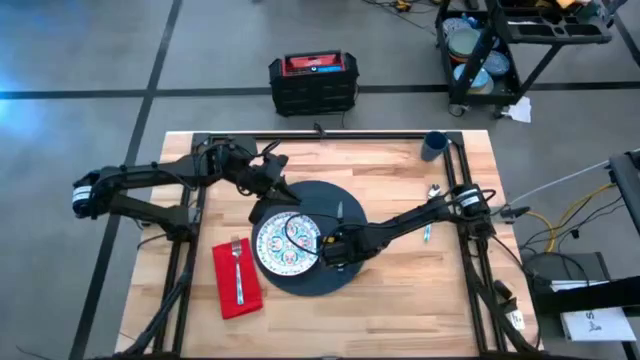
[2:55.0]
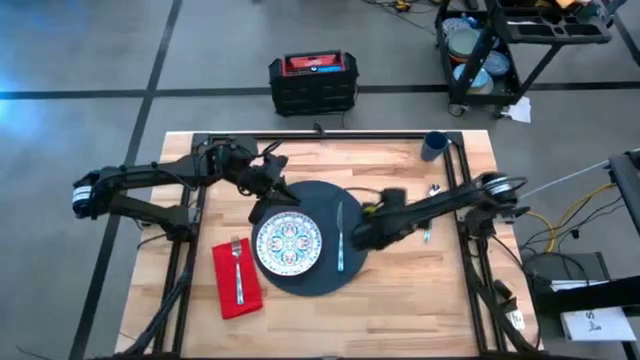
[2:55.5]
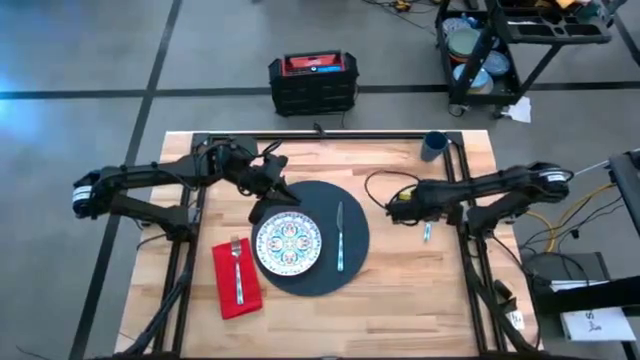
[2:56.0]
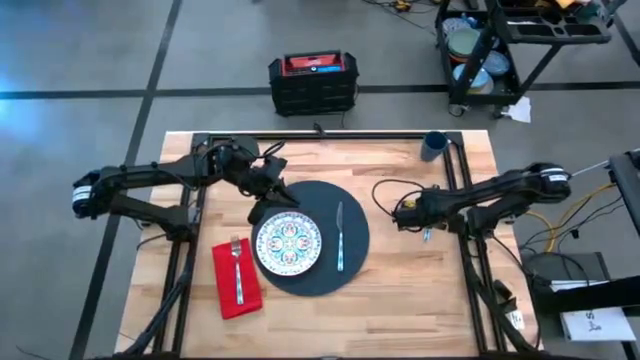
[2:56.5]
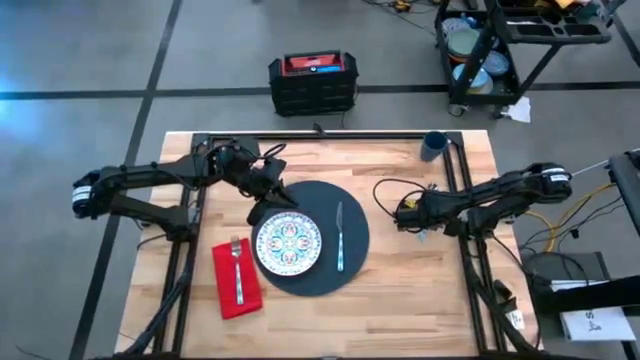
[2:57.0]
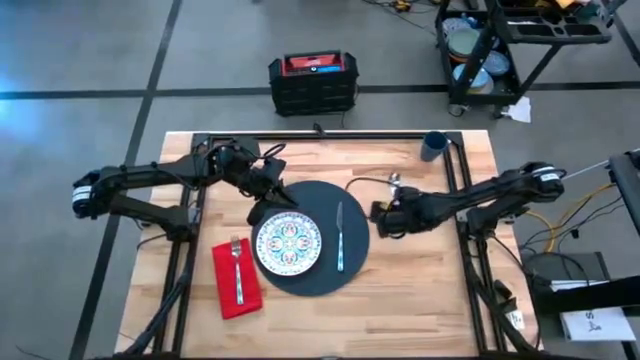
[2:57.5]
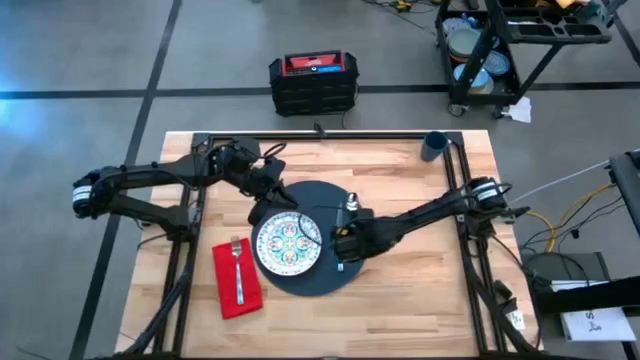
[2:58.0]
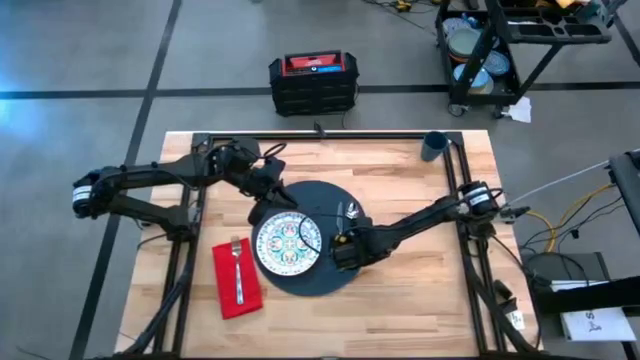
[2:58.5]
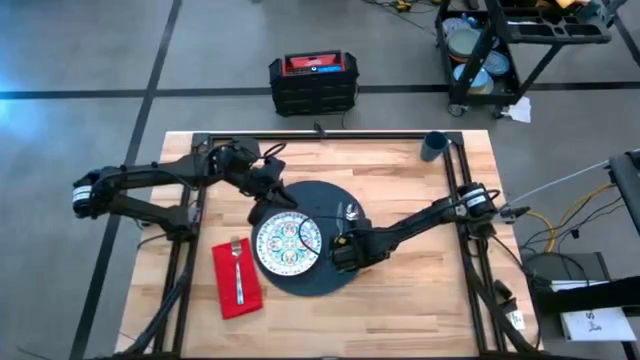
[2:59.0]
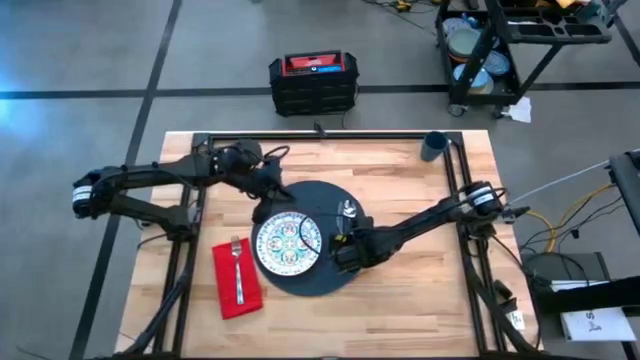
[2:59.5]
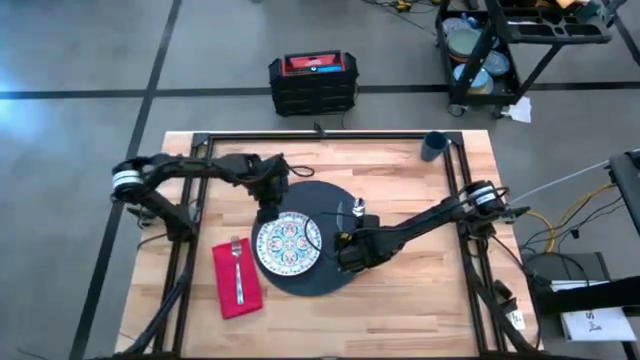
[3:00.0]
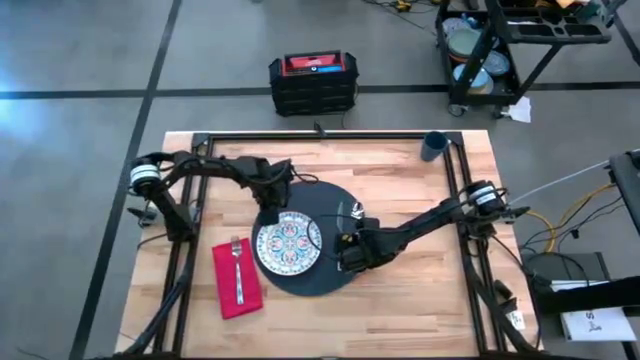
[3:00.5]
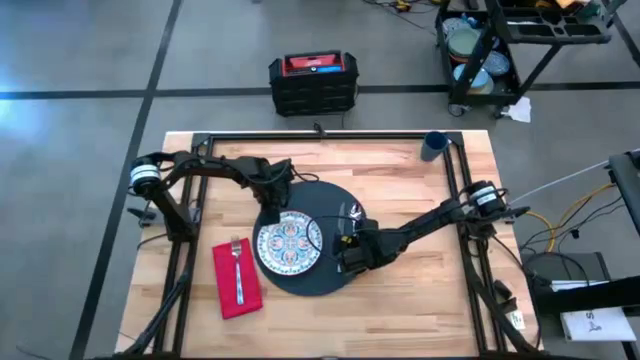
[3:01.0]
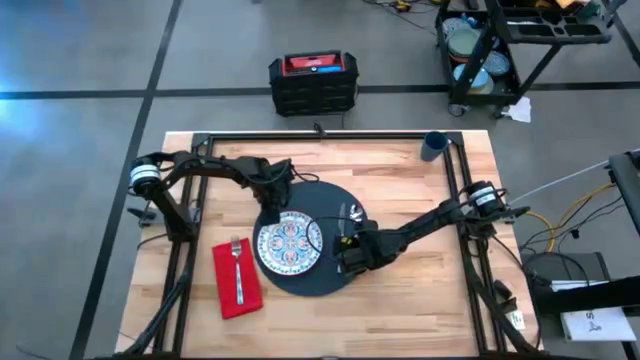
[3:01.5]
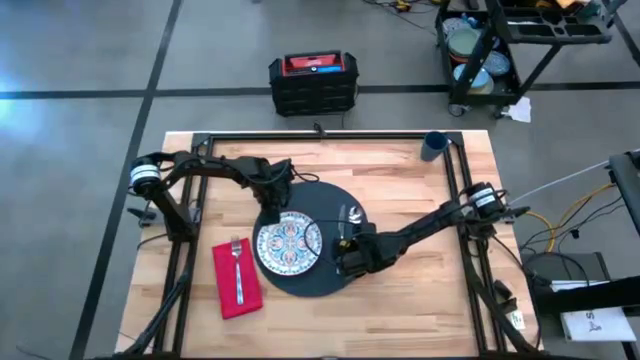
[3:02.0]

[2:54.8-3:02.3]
Task: Set table place
Put the blue spoon on the black placemat

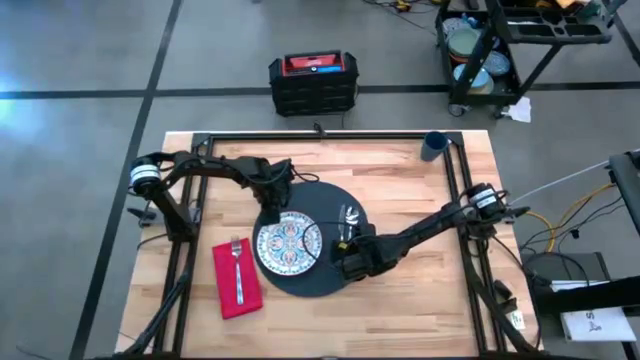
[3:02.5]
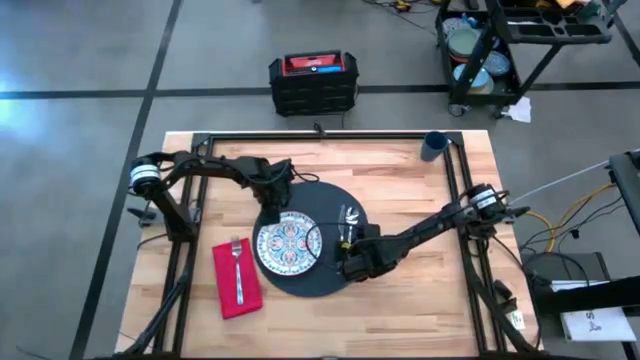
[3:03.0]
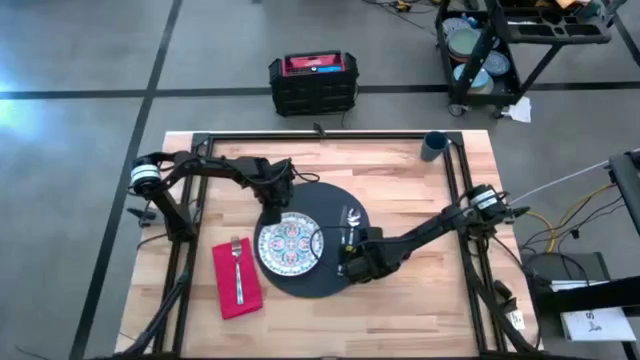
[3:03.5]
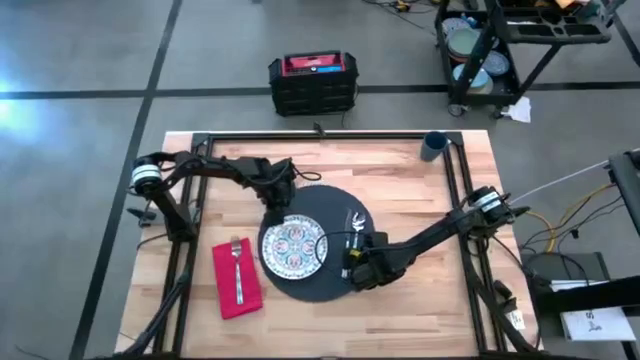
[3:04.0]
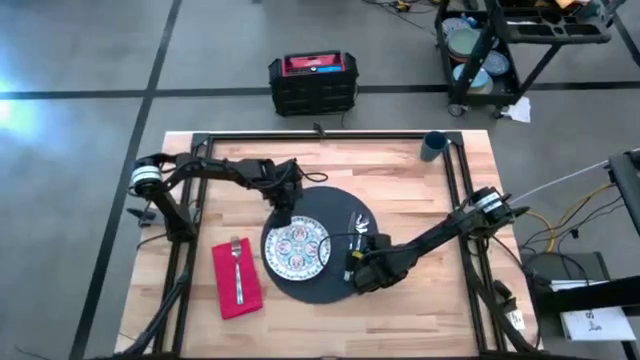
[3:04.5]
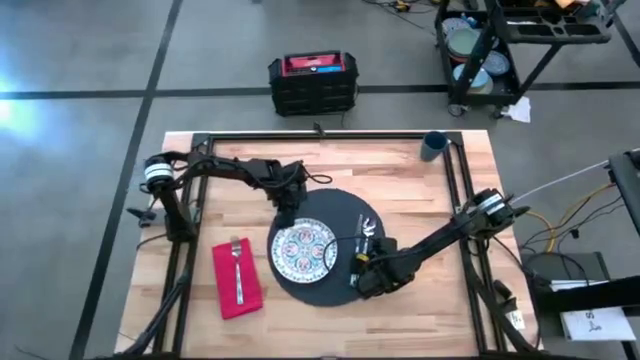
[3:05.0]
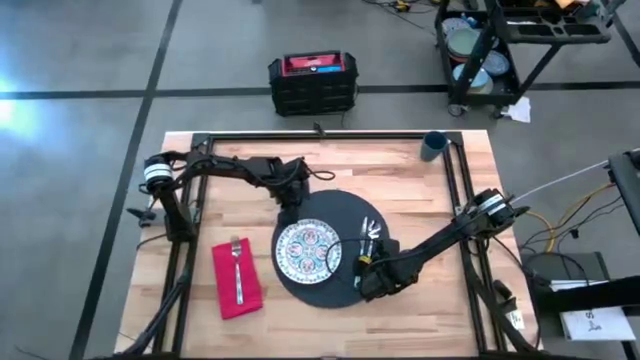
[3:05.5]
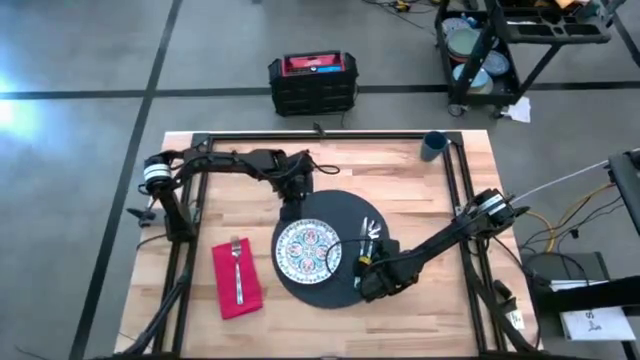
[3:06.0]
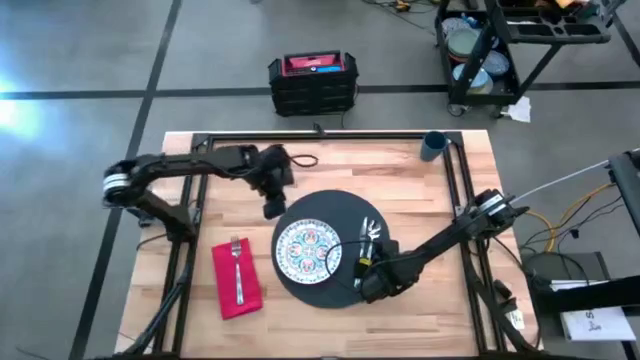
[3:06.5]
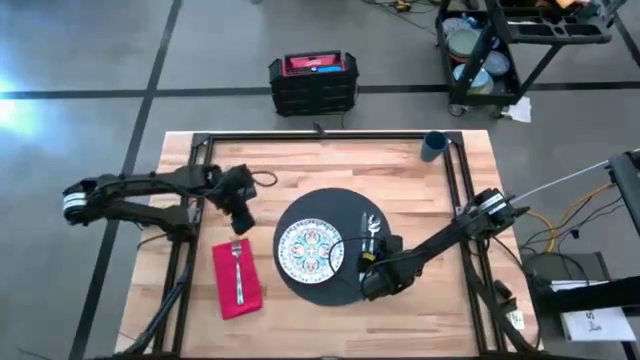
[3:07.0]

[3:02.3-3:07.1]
Adjust the black placemat at the center of the table

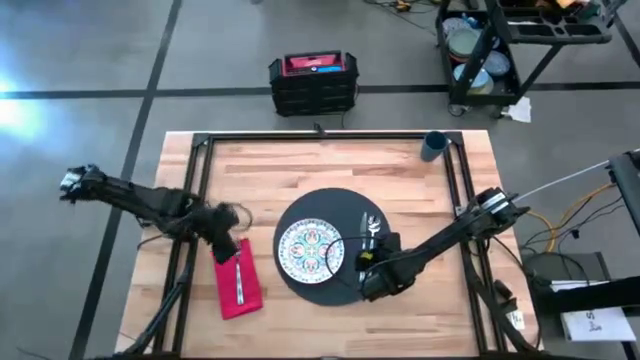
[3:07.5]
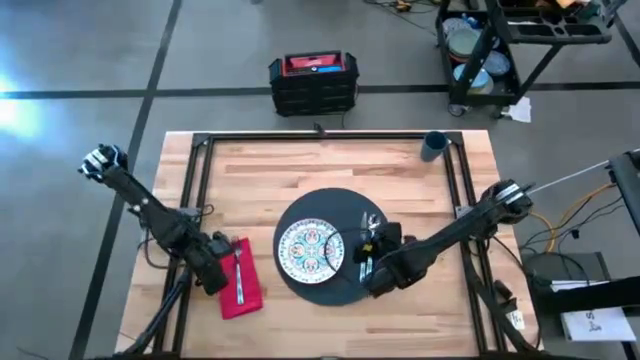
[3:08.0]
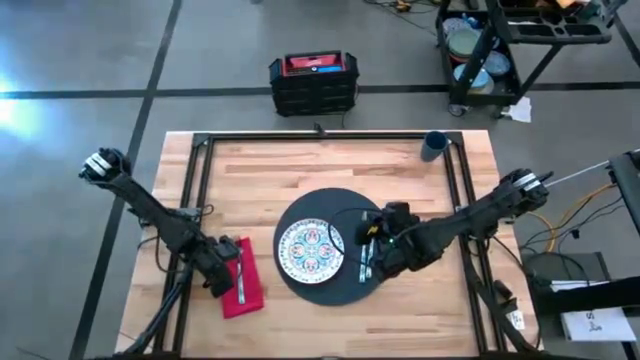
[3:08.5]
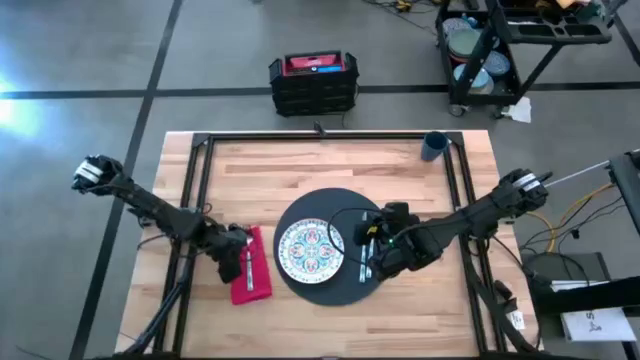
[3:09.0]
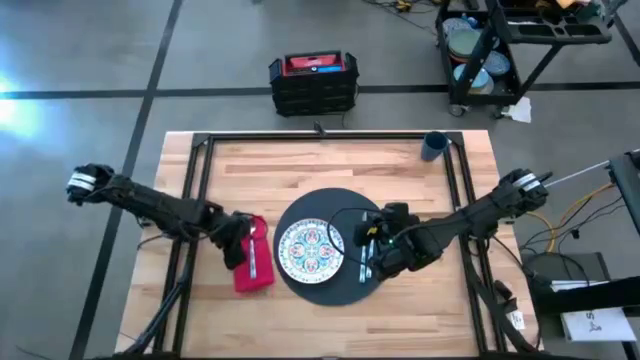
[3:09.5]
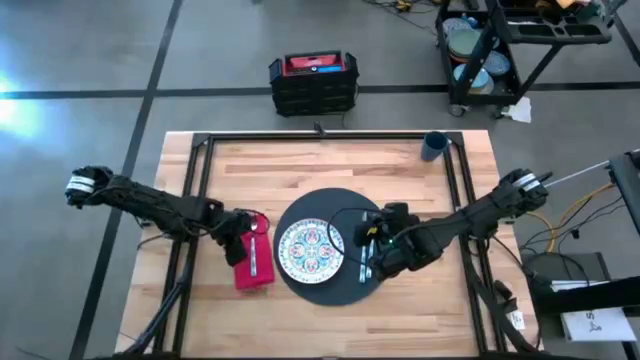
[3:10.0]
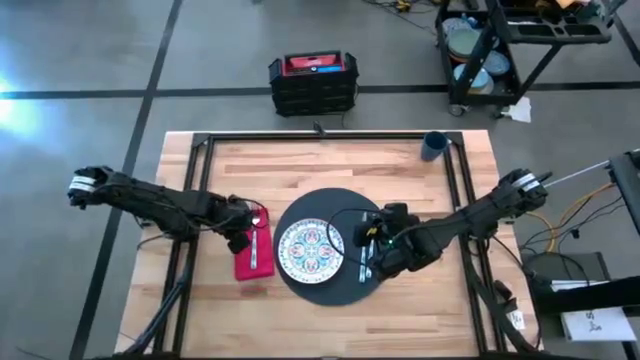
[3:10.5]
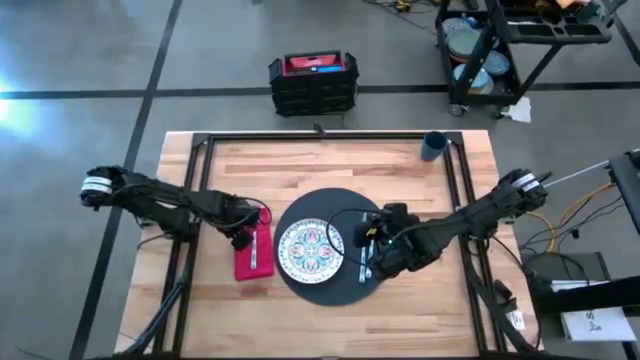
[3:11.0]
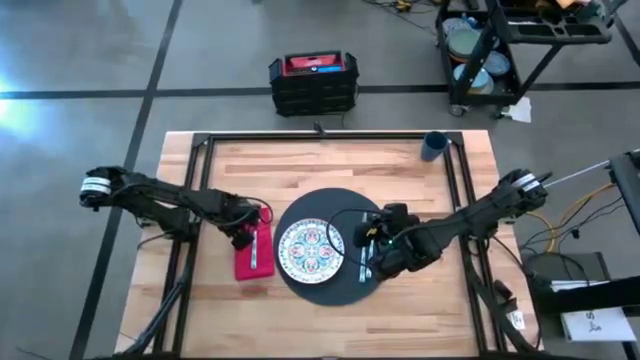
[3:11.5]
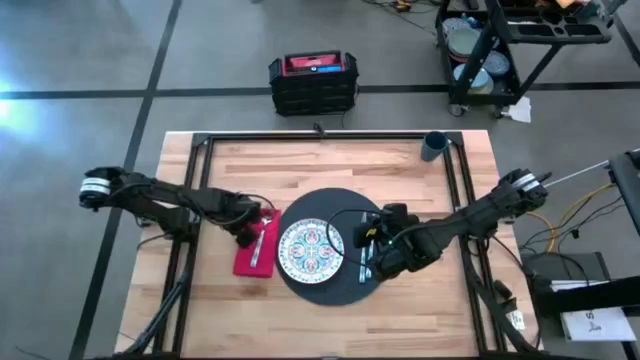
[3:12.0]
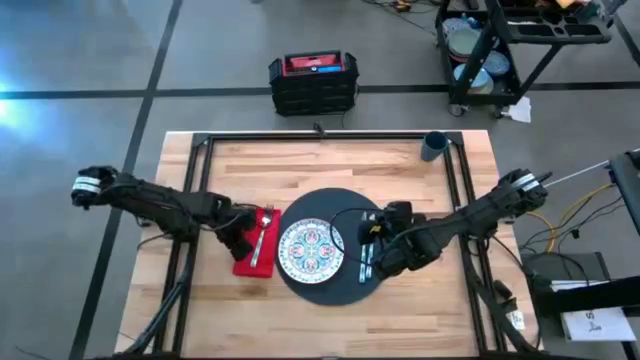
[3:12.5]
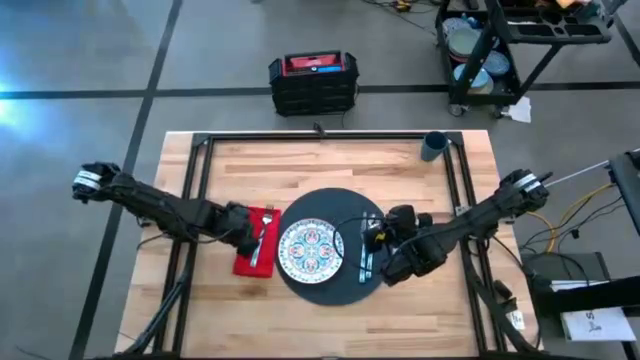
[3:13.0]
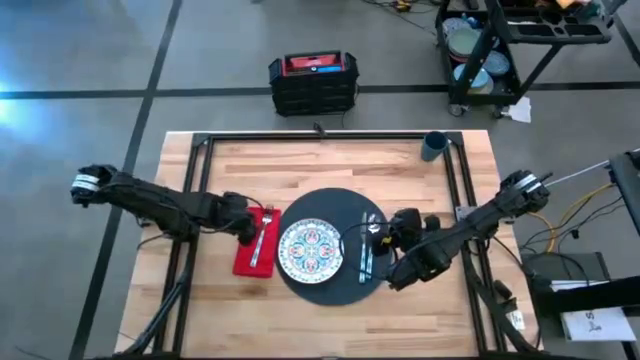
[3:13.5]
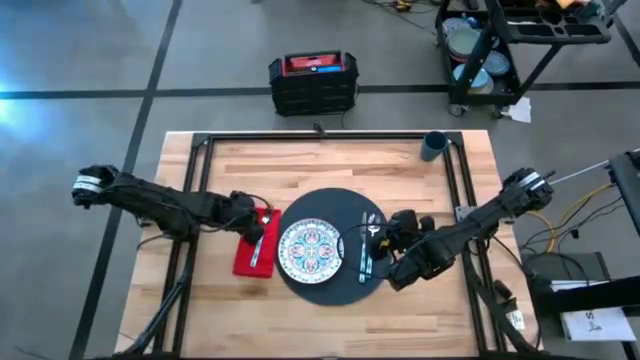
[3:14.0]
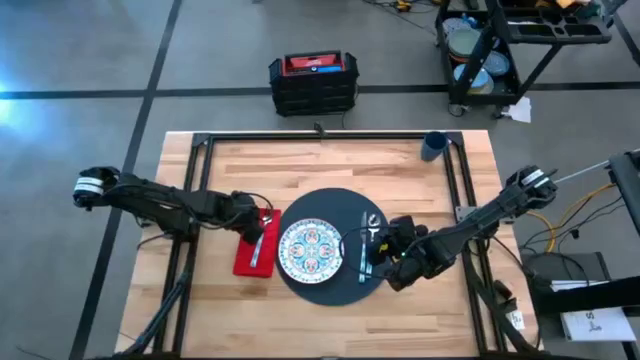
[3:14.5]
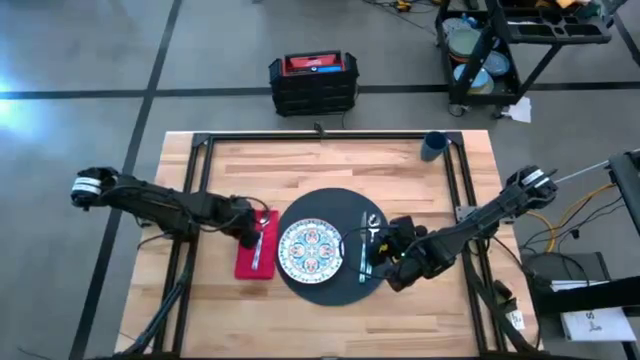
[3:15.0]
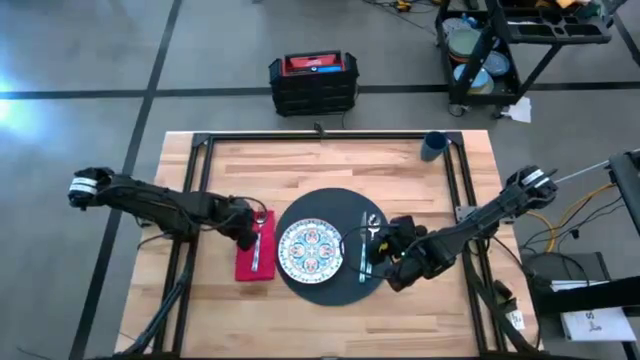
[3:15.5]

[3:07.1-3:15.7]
Move the red napkin to the left of the black placemat

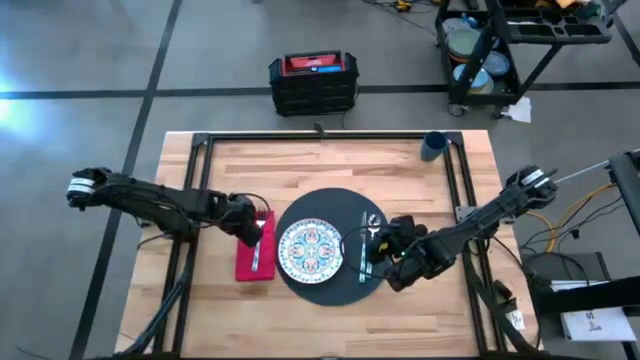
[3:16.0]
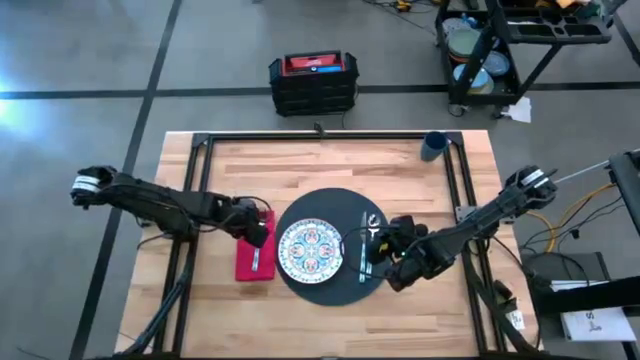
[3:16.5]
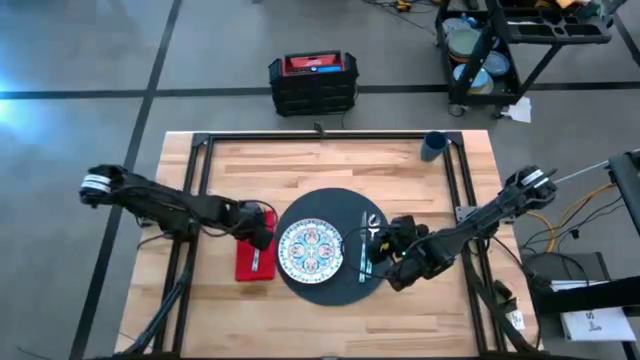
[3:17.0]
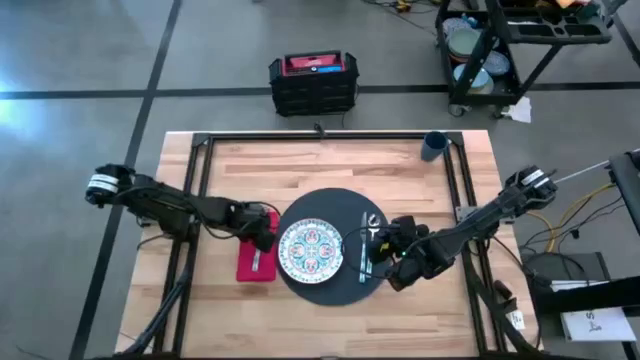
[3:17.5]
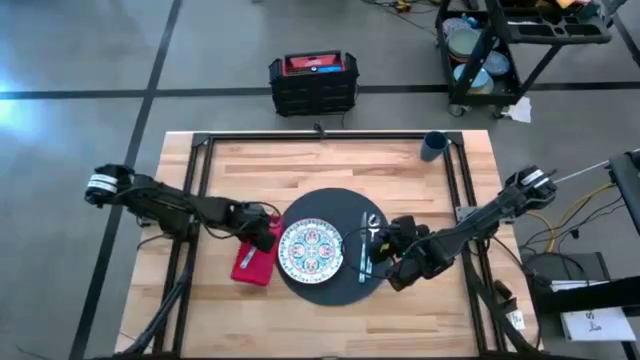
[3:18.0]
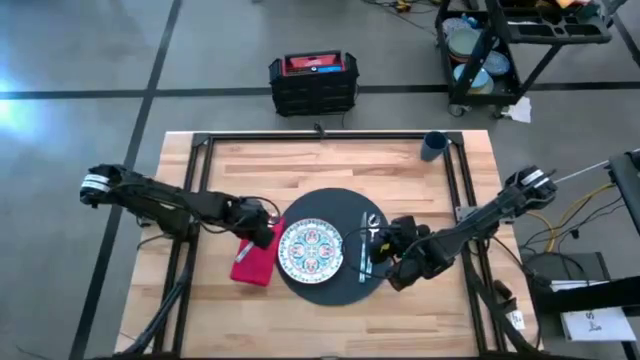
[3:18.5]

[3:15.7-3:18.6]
Adjust the blue fork
